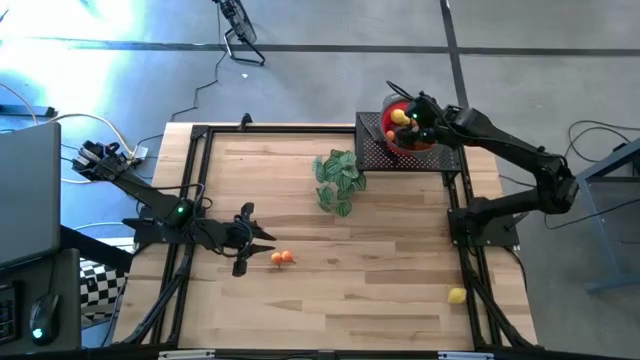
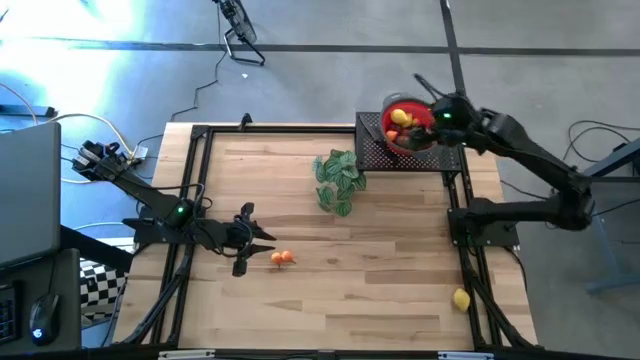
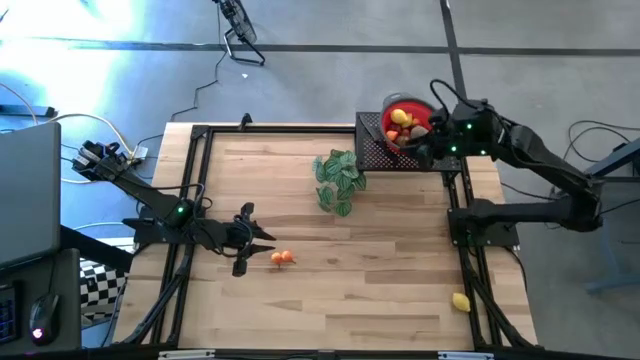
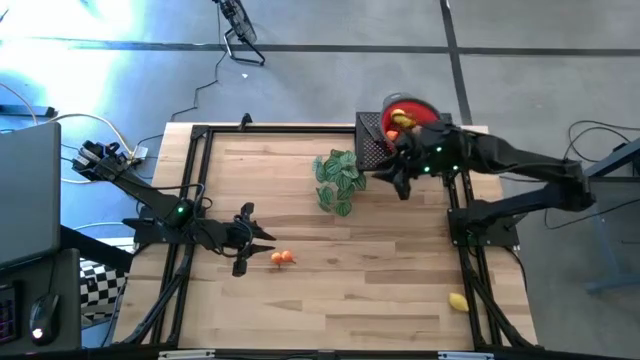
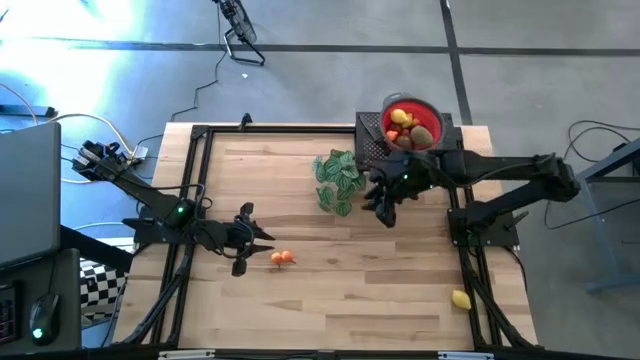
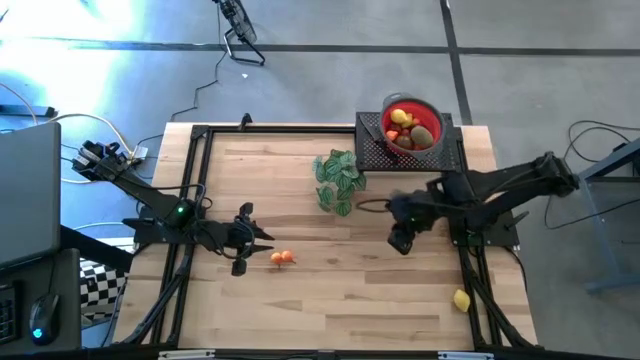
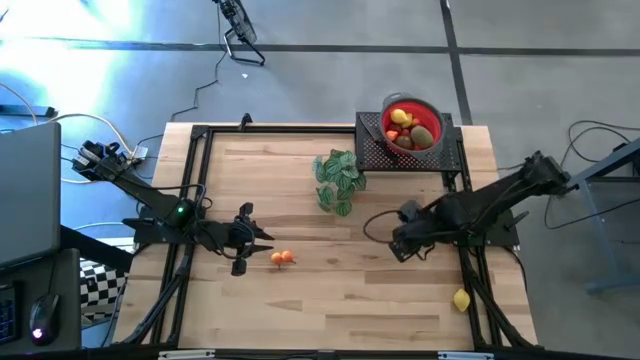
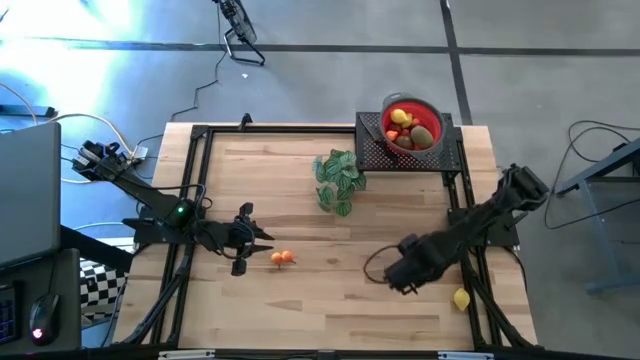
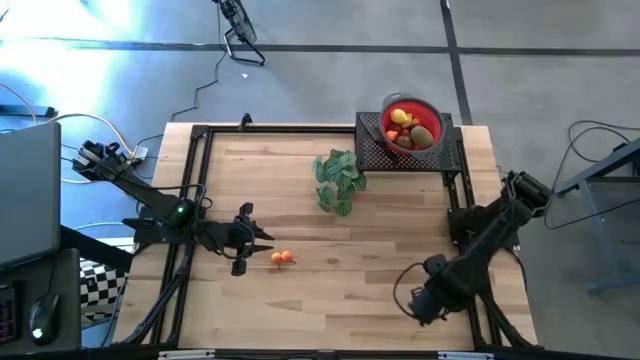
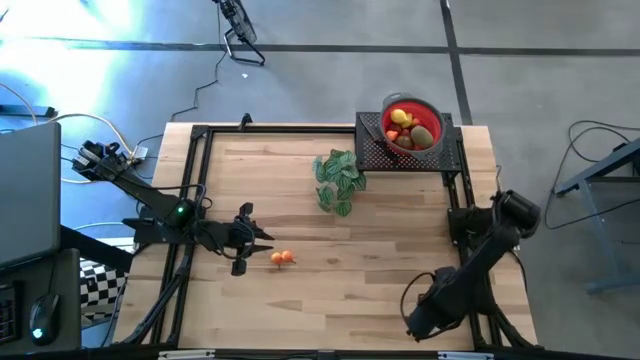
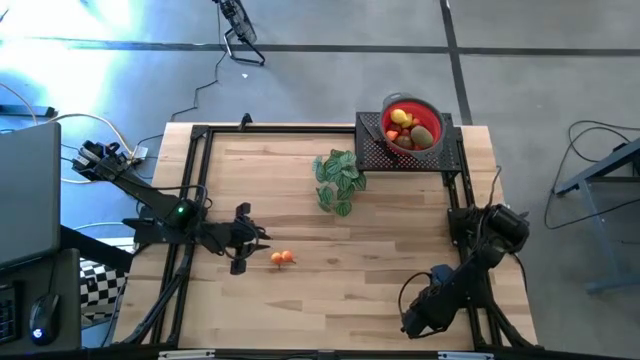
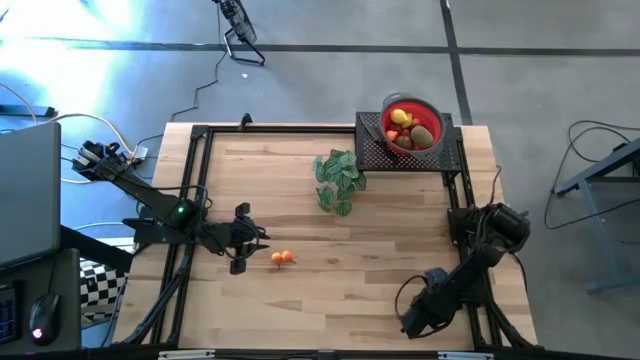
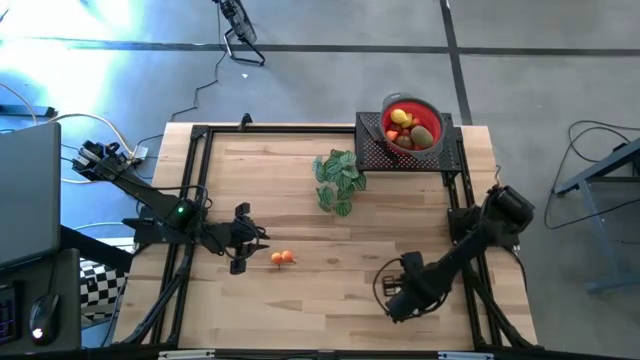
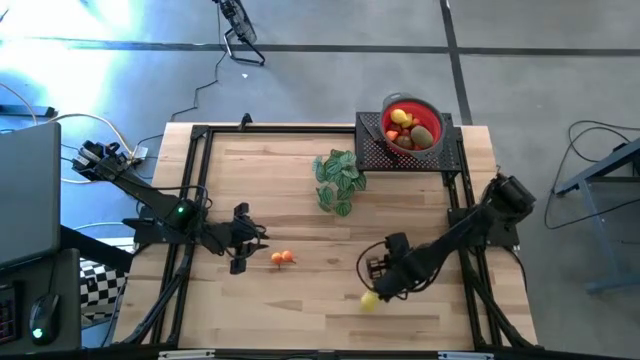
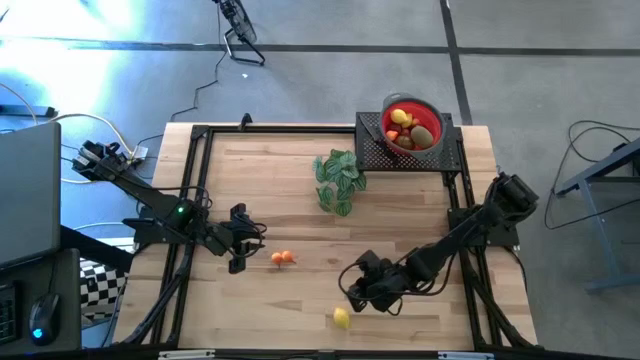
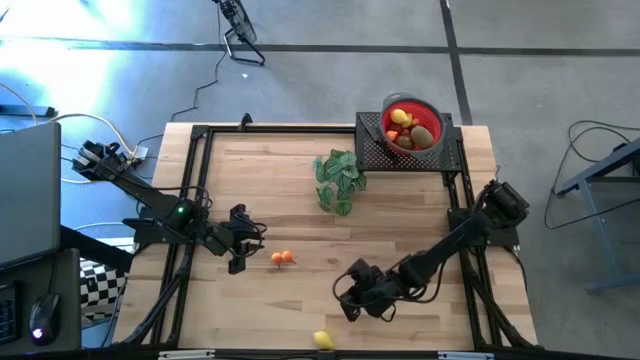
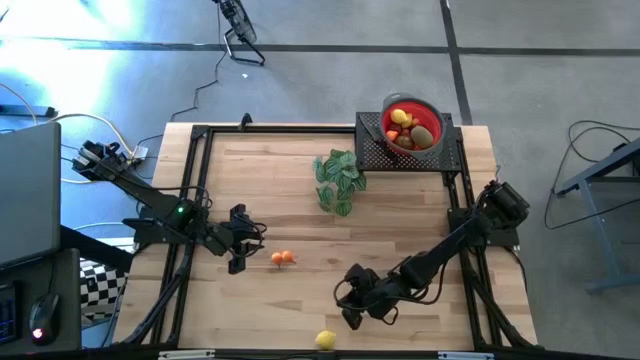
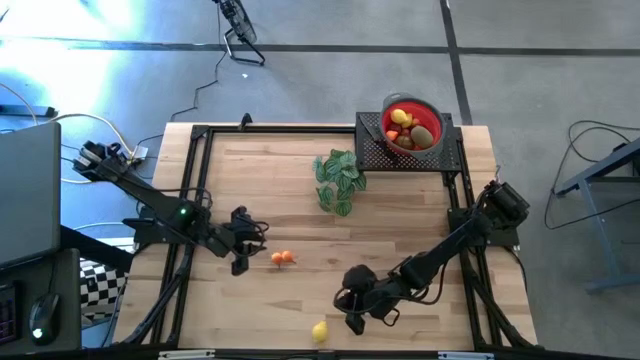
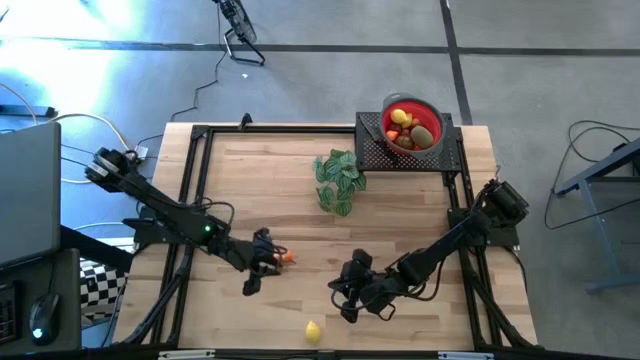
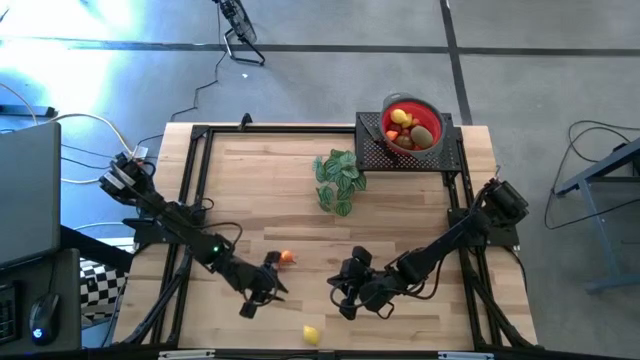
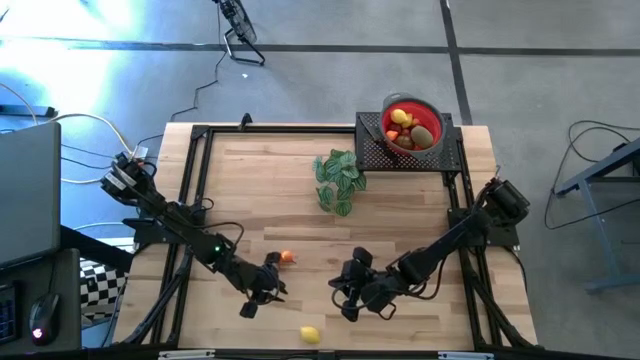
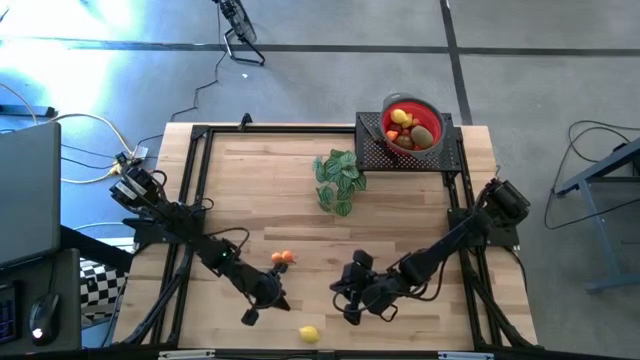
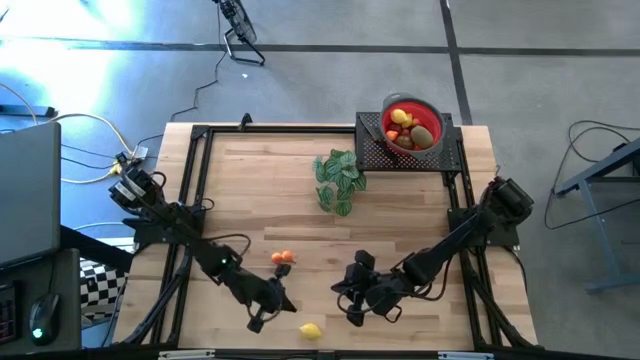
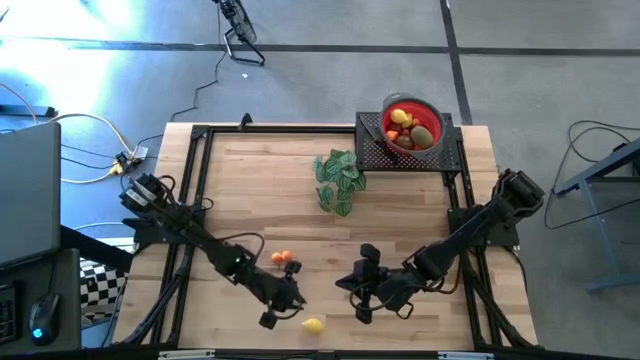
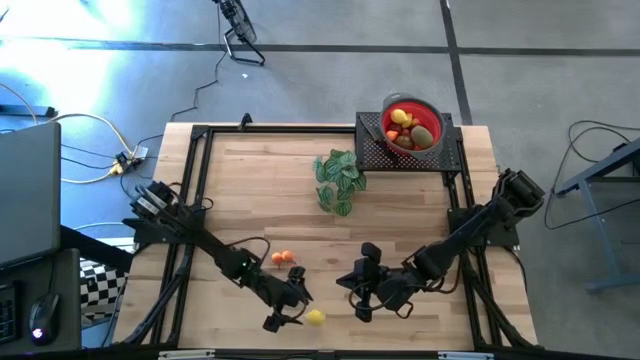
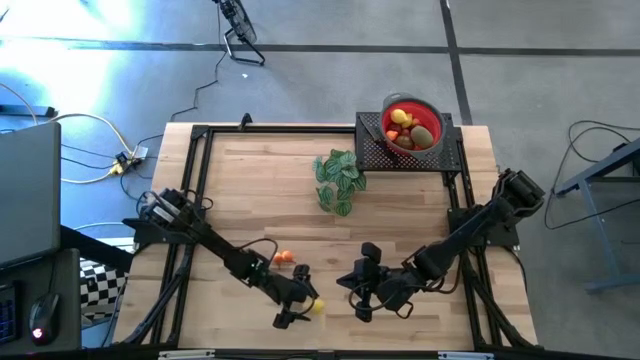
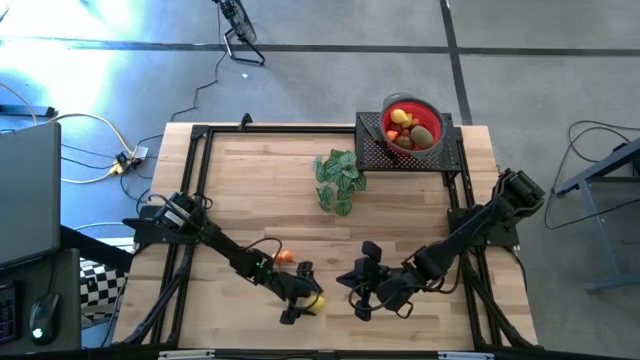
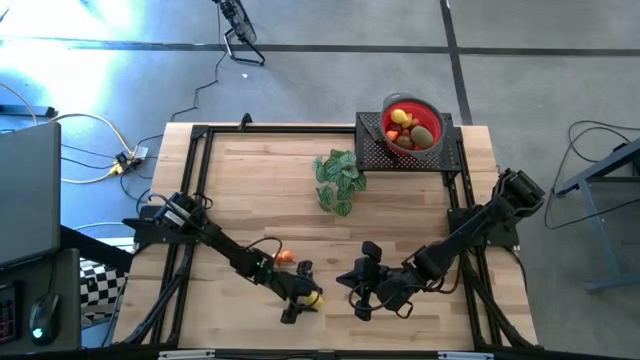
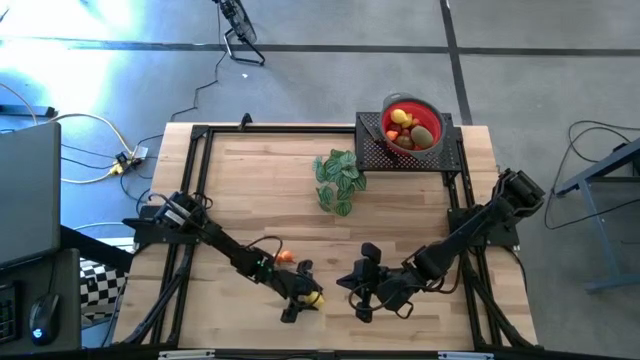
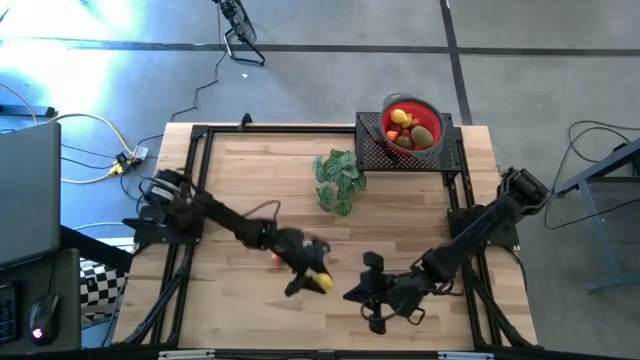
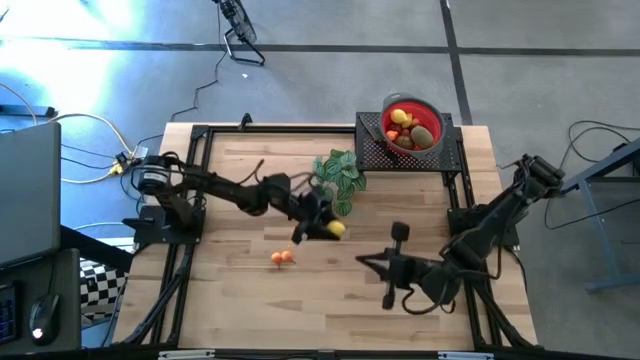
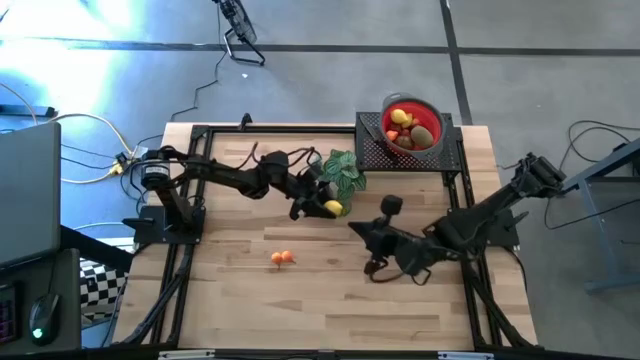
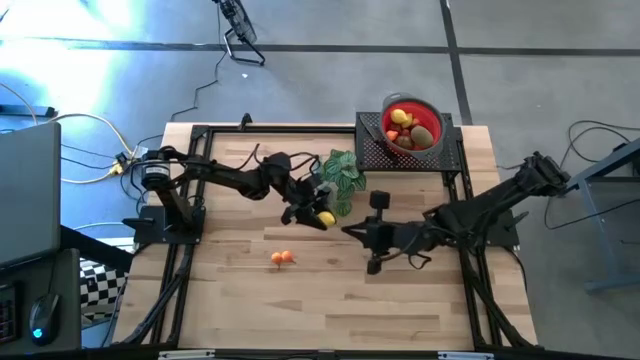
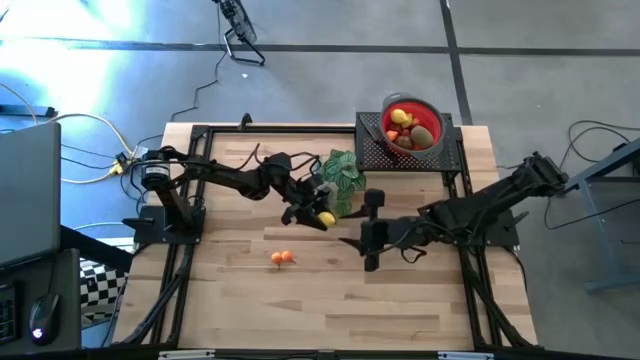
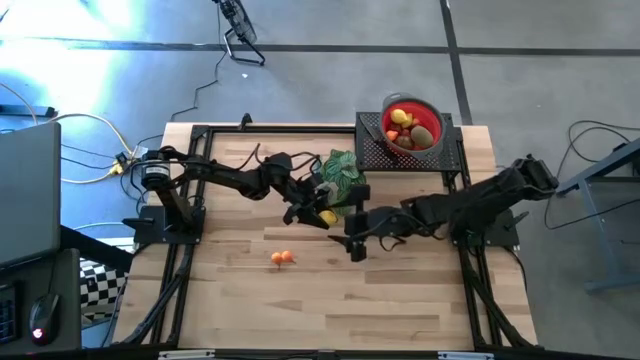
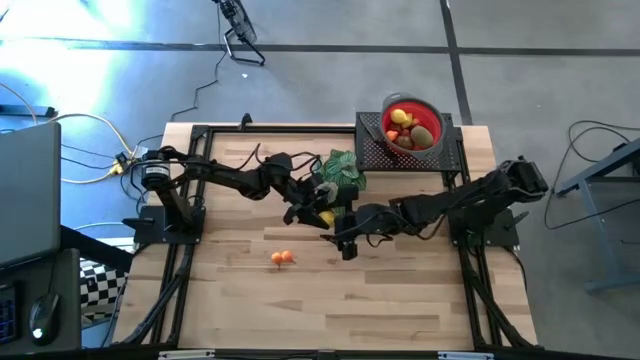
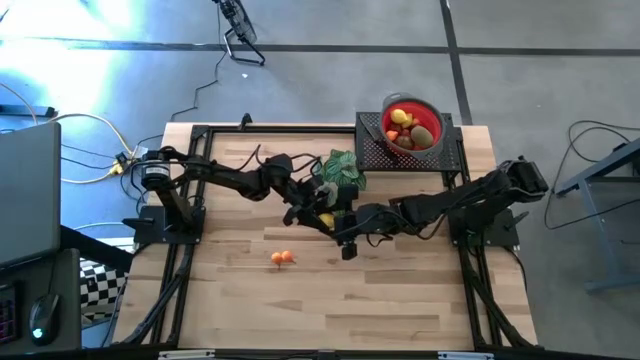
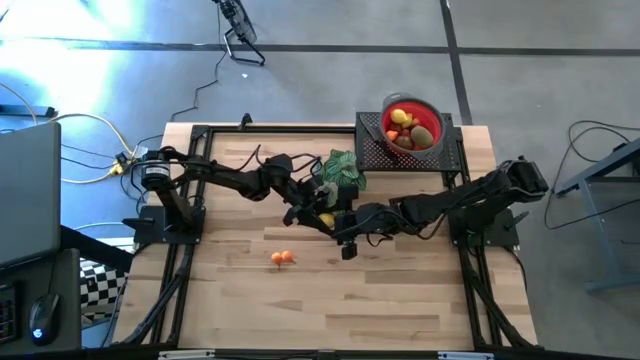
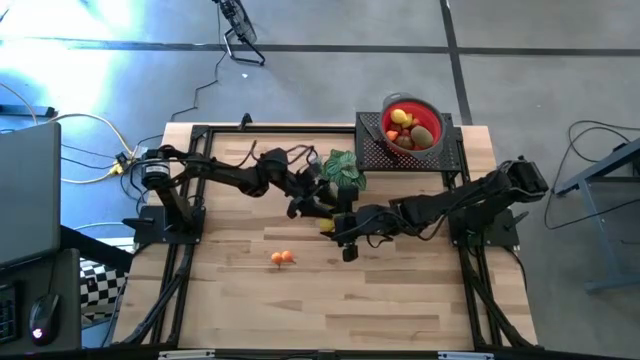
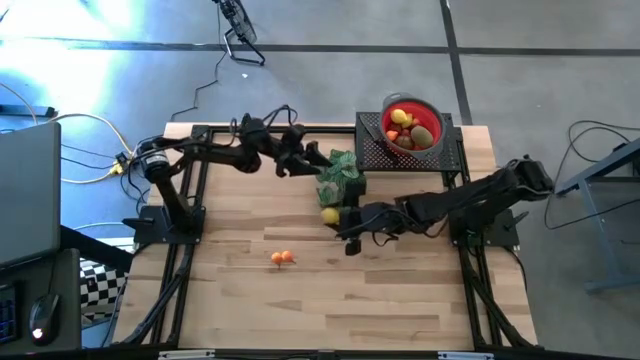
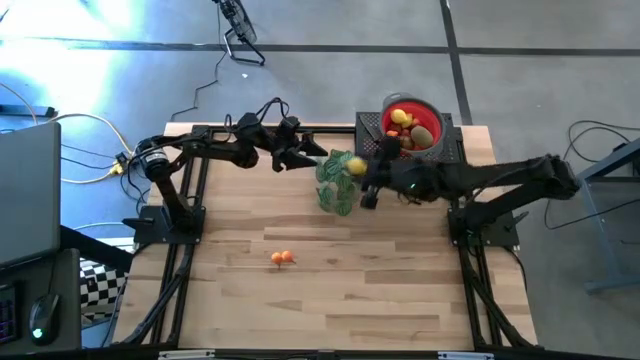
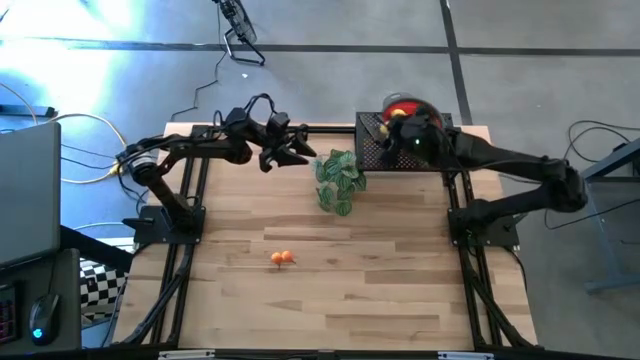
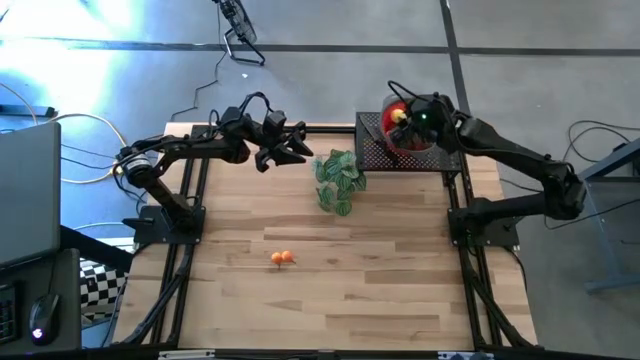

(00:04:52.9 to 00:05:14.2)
Task: Pick & Place Fruit
Put the lemon into the red colander
